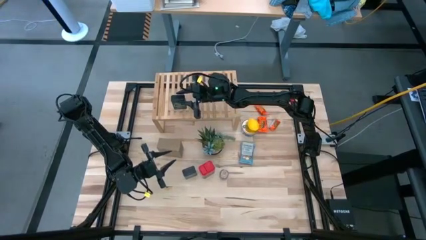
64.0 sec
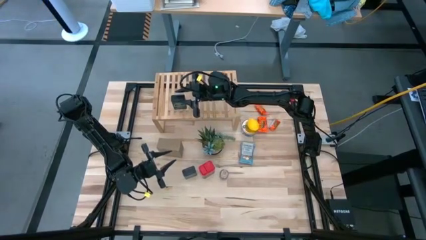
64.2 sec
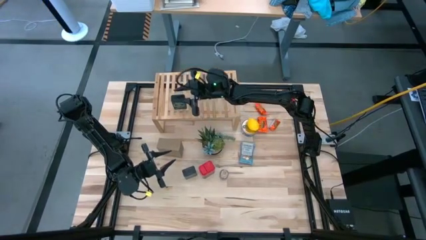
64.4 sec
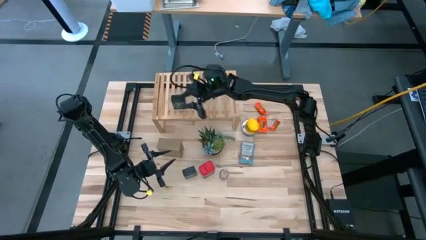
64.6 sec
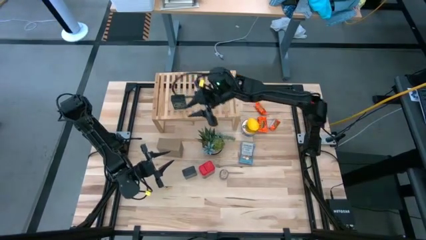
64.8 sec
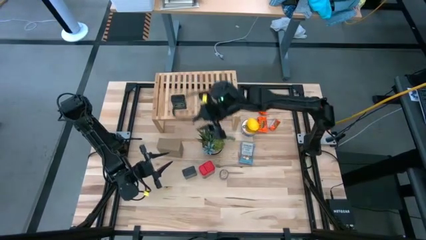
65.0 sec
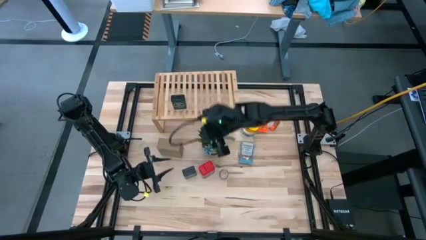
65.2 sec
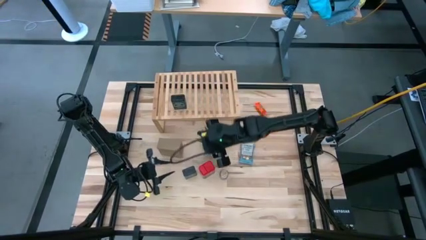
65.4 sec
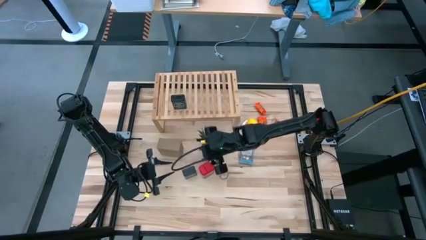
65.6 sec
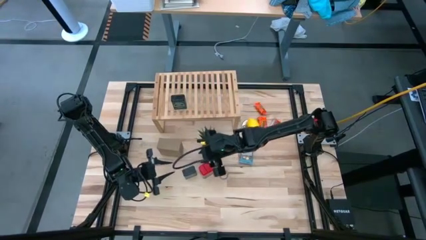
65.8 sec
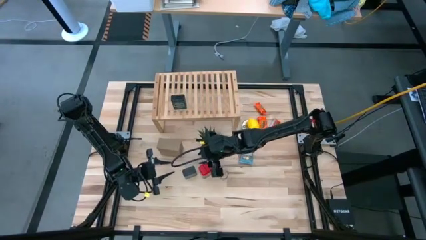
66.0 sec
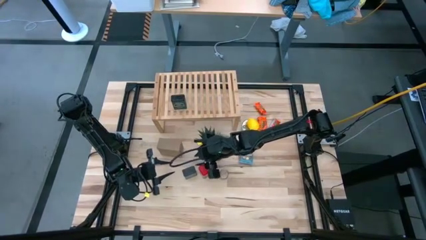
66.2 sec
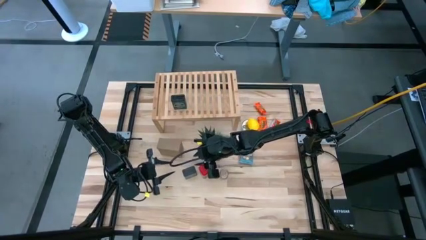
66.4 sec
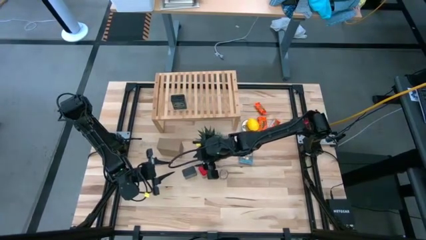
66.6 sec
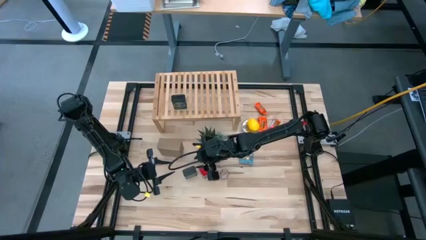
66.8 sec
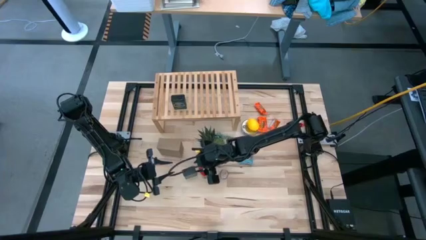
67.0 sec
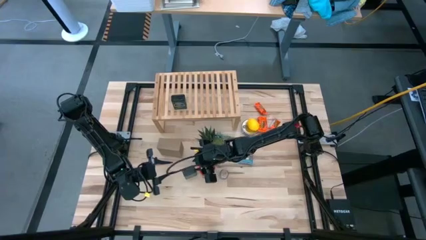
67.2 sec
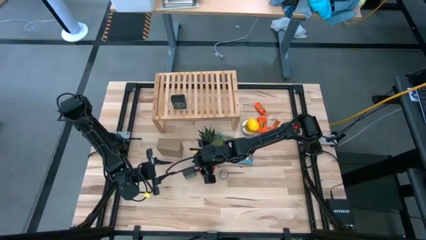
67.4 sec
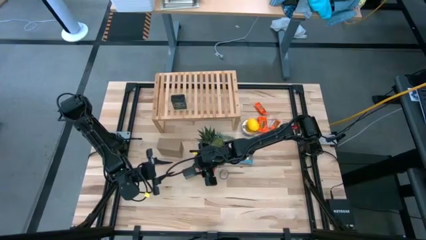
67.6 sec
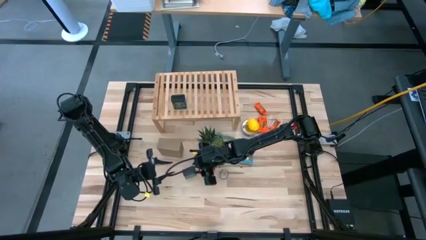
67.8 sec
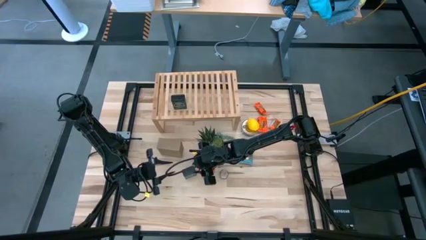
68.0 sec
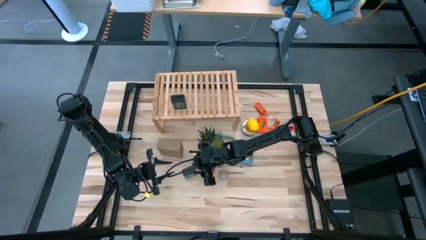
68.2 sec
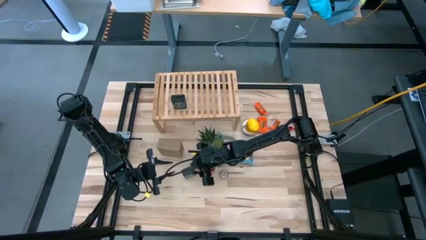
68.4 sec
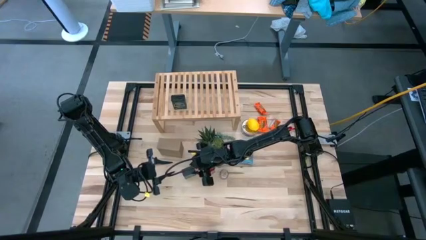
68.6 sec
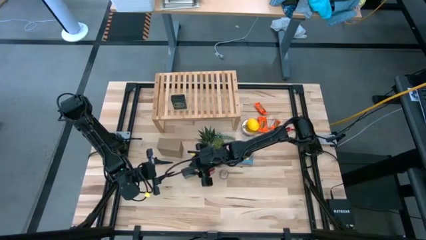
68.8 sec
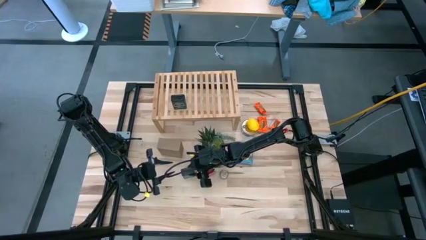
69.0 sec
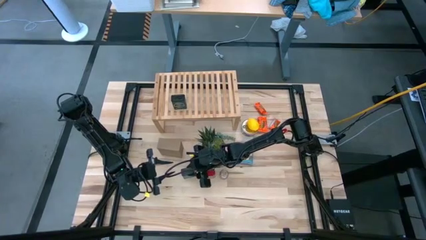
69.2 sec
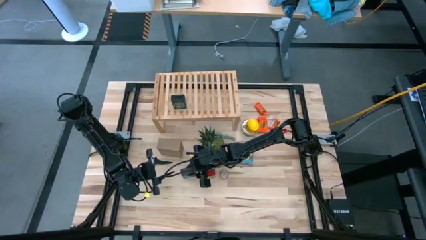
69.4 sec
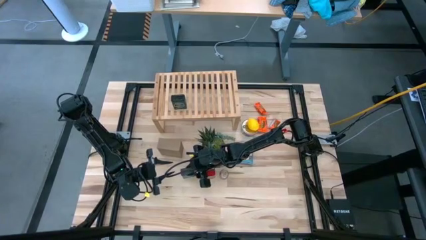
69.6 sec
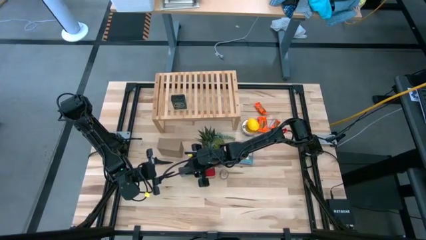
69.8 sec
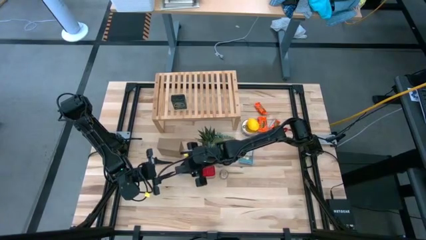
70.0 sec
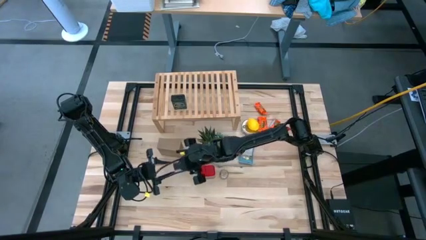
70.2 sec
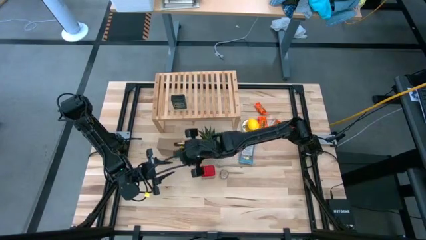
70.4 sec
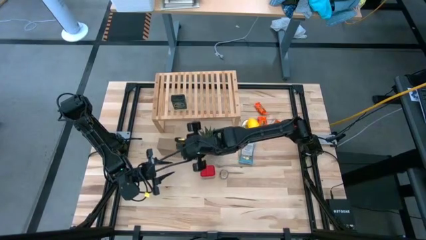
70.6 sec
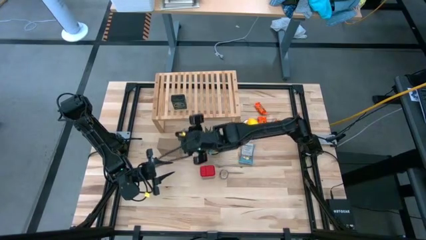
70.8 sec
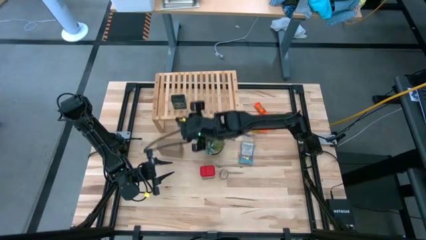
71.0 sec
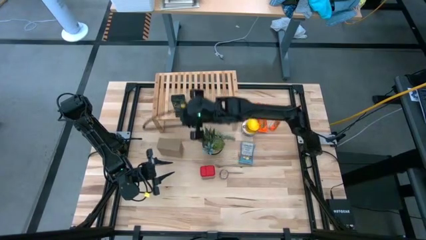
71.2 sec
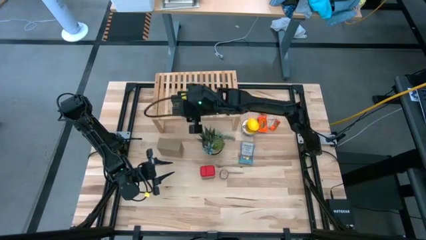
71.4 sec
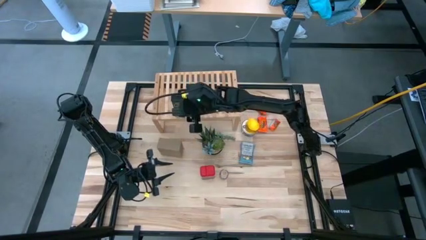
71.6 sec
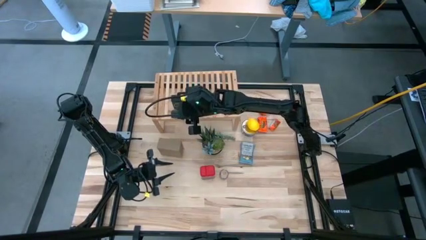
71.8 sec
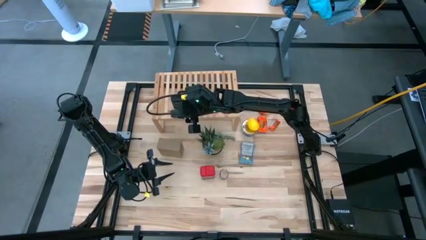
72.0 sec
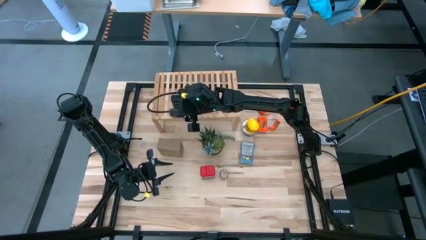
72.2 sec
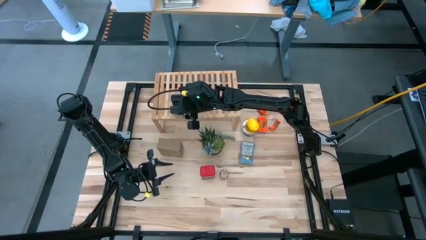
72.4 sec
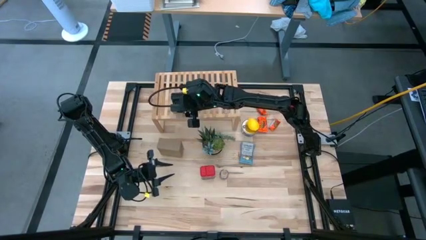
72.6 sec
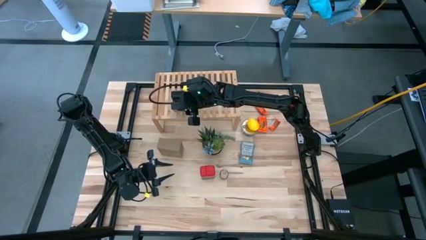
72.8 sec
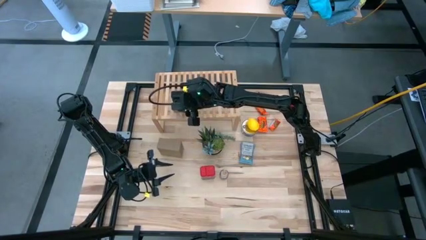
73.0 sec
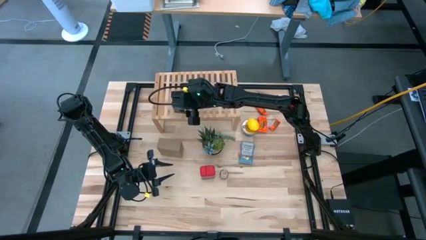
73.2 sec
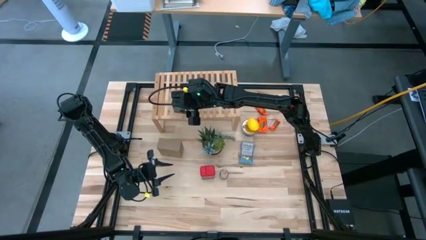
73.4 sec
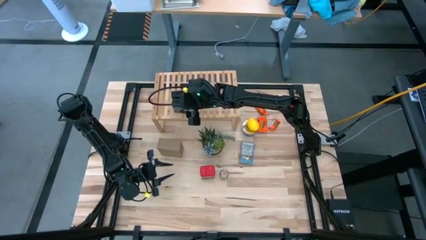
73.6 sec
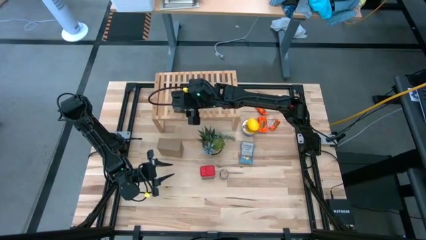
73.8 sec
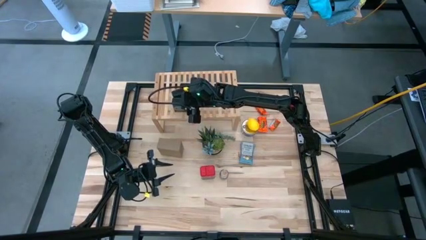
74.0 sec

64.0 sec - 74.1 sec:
Task: Shelf spices
Put the green can on the shelf

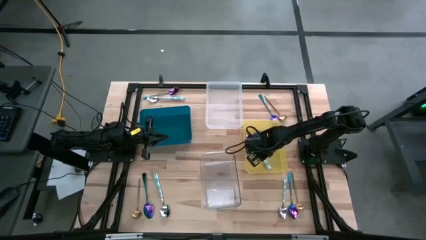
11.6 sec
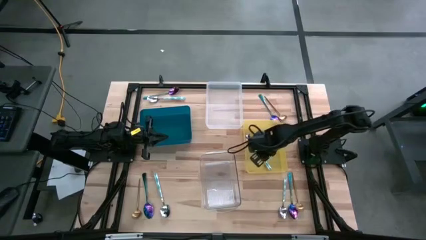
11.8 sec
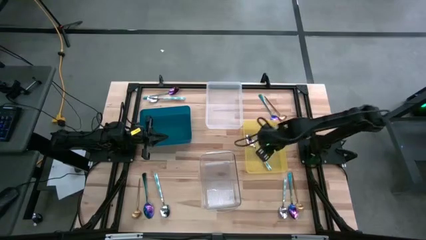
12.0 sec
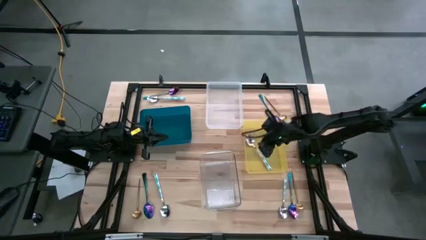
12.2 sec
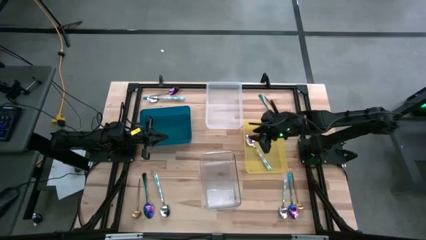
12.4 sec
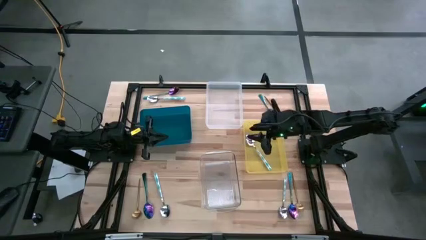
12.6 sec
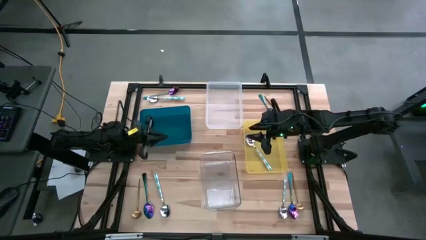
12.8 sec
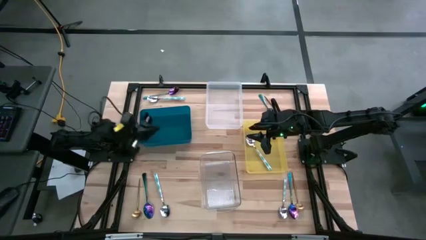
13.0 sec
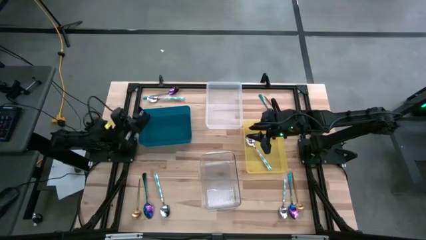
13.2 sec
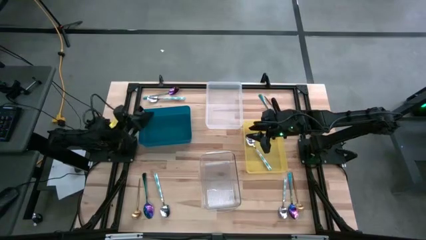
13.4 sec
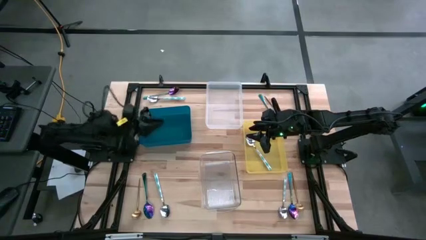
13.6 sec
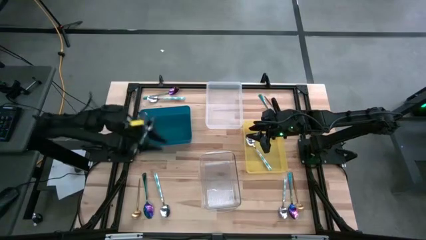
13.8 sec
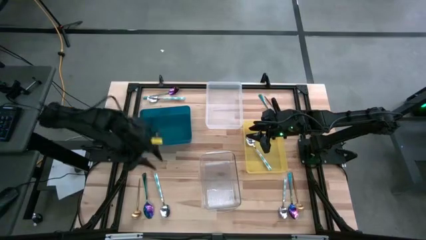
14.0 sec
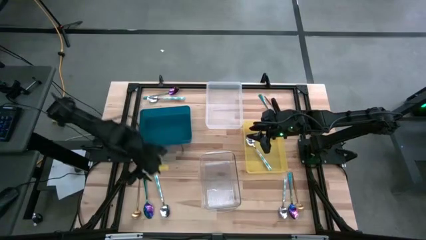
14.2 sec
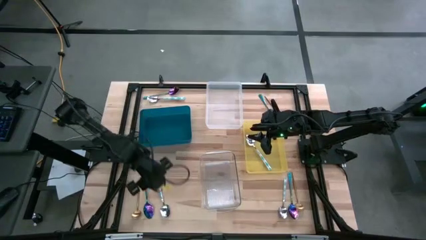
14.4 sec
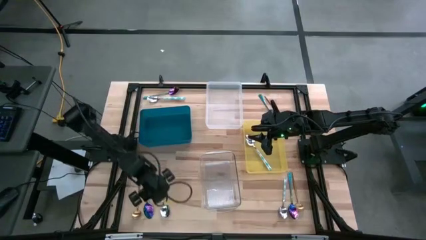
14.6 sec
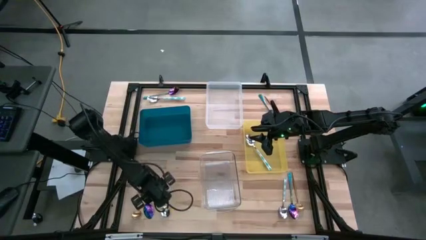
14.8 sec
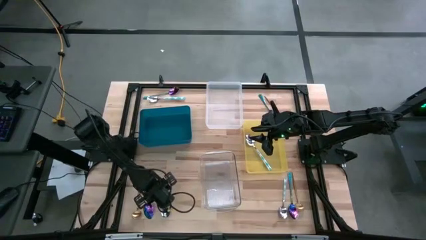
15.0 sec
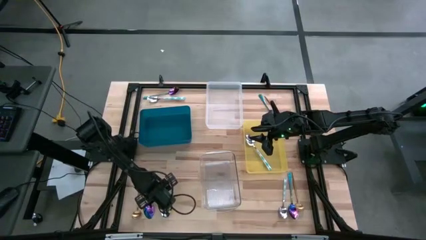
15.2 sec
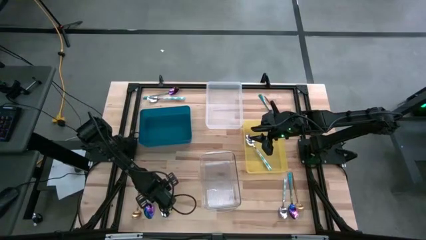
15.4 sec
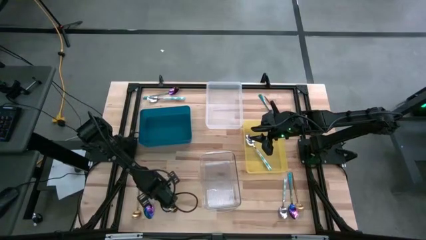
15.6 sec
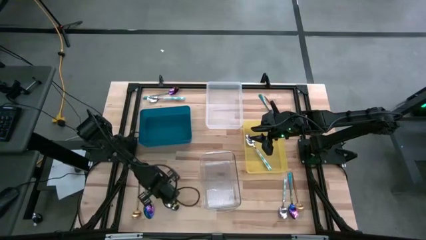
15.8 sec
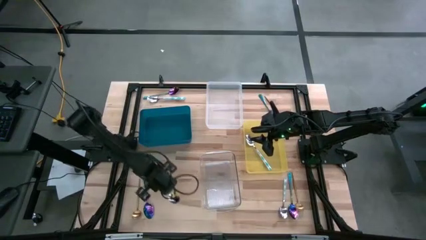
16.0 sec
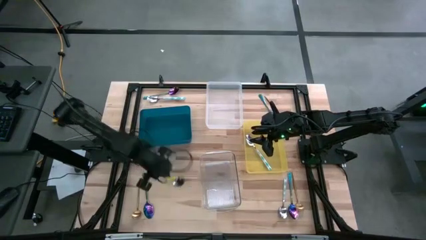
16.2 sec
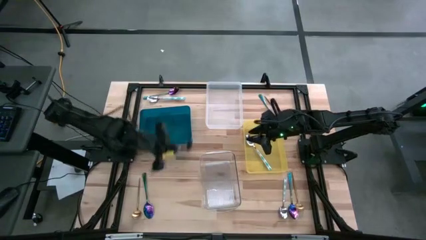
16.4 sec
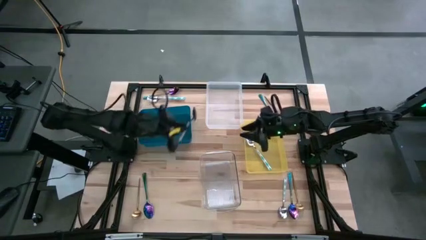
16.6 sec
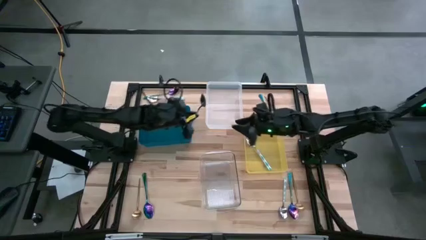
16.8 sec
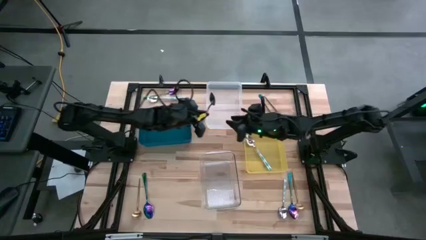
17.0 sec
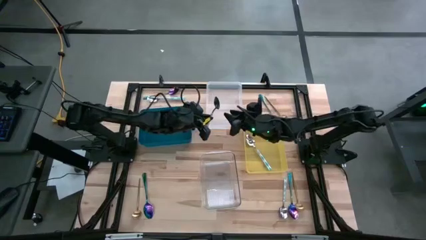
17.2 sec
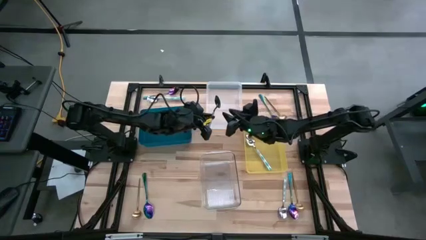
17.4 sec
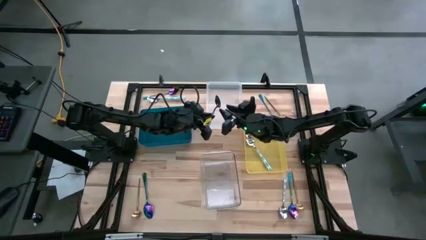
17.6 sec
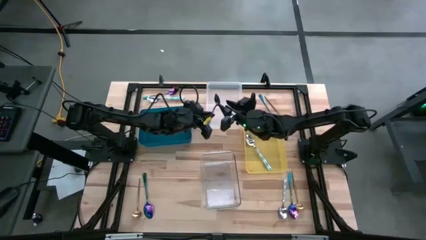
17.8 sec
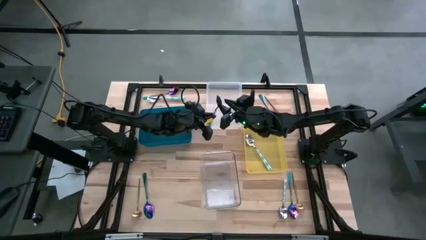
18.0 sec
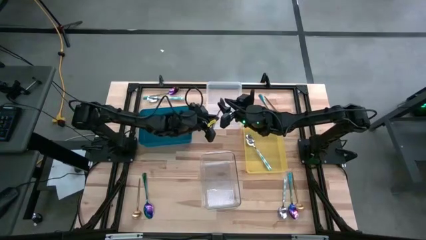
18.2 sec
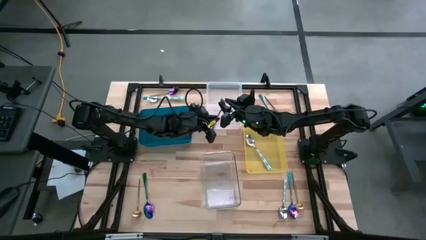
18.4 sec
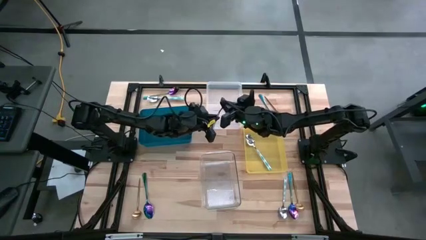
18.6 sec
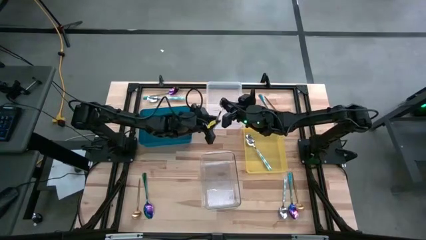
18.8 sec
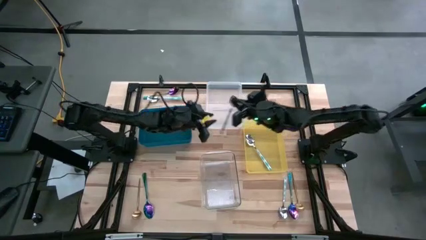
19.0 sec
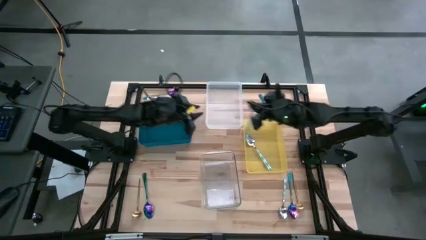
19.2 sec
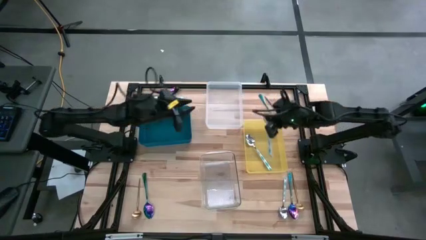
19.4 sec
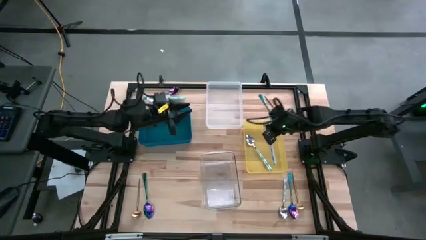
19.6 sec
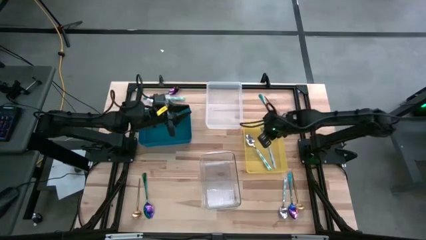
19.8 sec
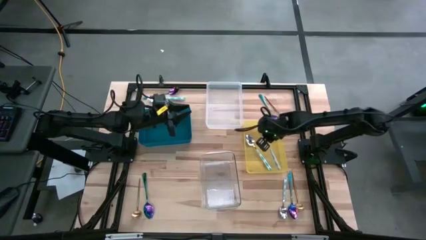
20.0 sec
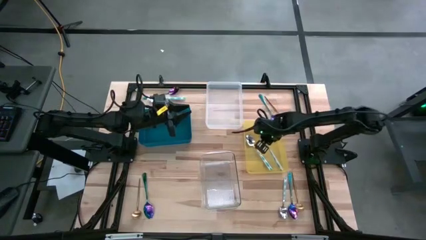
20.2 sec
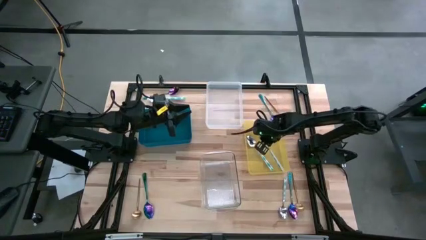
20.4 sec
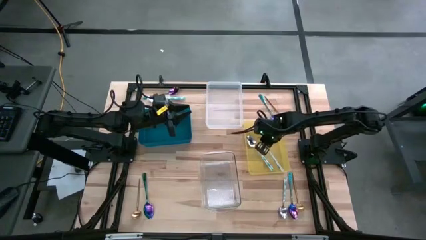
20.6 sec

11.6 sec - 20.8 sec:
Task: Sort silverware by color (type)
Put the white spoon into the yellow bin
